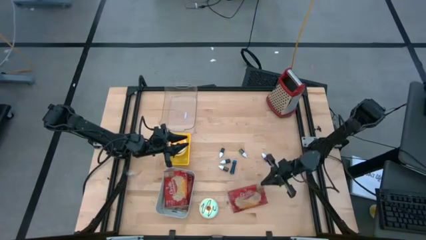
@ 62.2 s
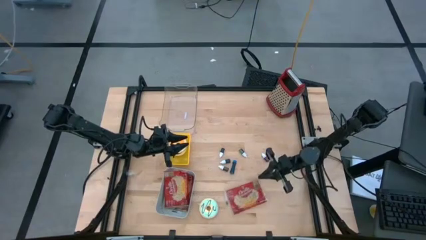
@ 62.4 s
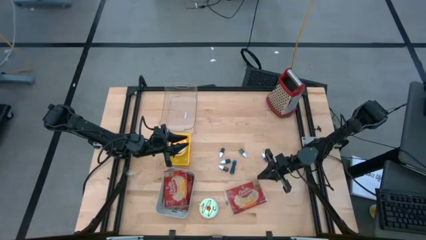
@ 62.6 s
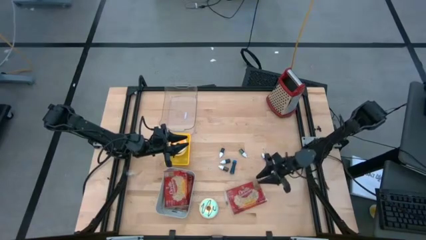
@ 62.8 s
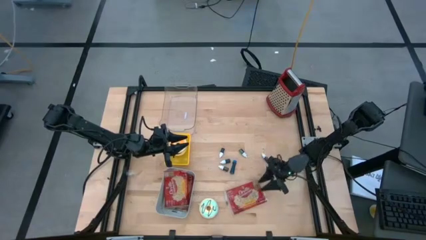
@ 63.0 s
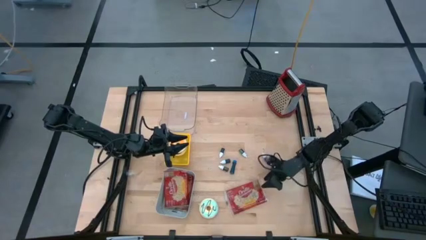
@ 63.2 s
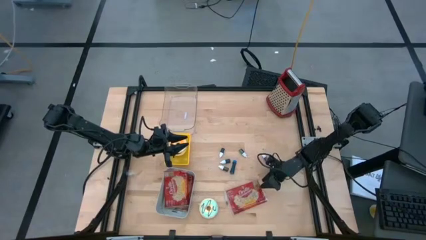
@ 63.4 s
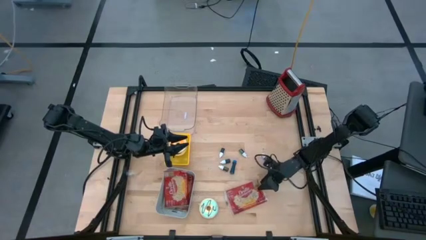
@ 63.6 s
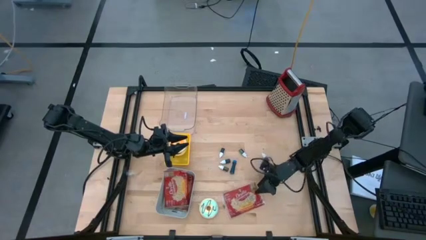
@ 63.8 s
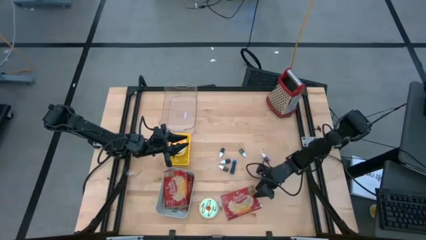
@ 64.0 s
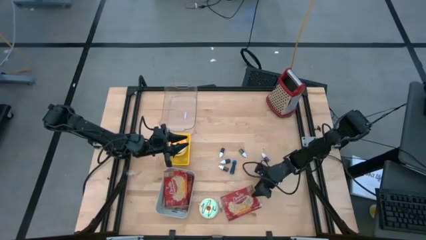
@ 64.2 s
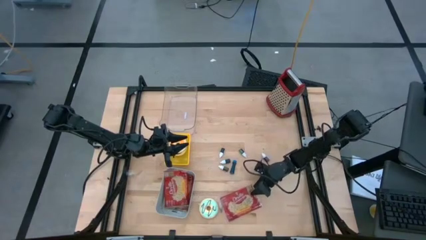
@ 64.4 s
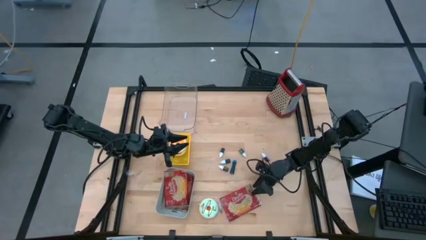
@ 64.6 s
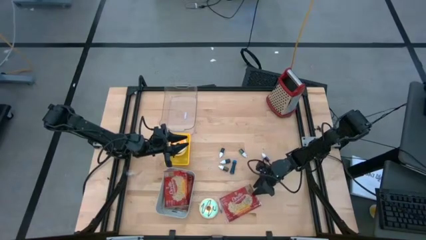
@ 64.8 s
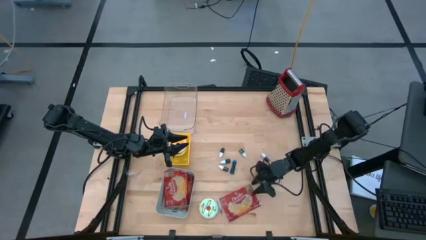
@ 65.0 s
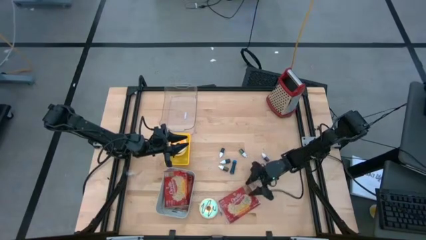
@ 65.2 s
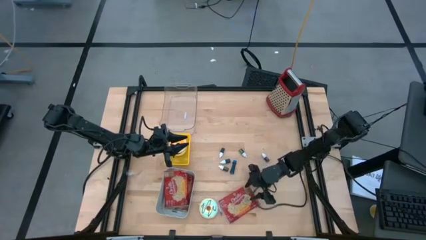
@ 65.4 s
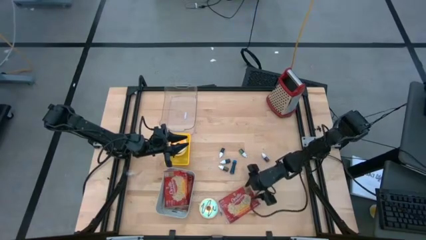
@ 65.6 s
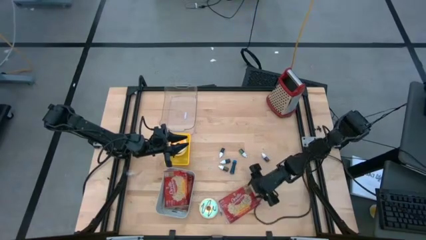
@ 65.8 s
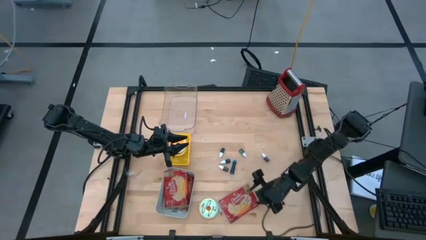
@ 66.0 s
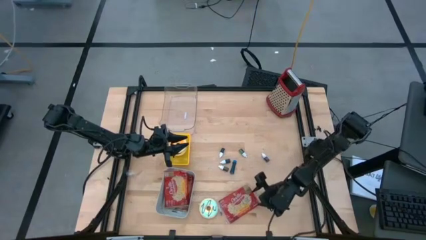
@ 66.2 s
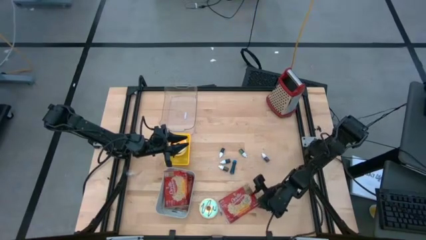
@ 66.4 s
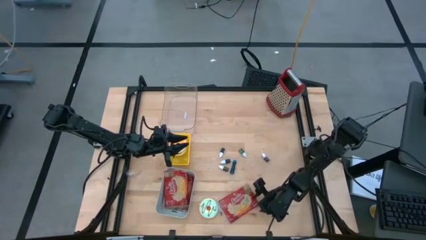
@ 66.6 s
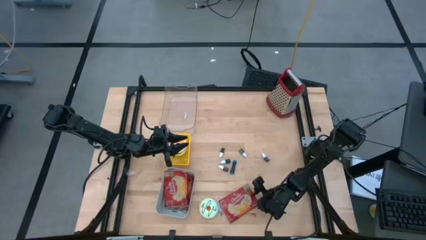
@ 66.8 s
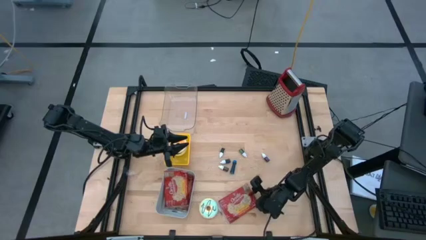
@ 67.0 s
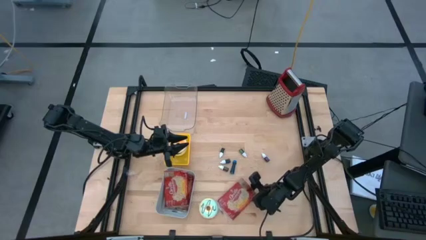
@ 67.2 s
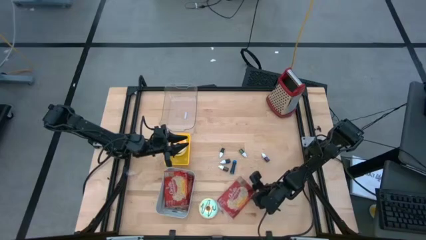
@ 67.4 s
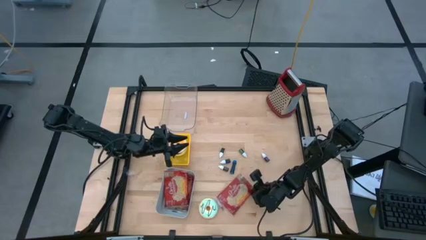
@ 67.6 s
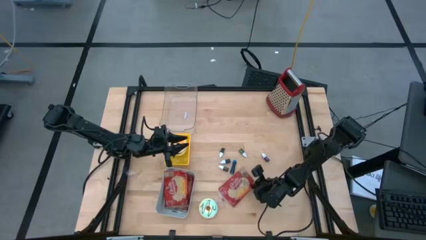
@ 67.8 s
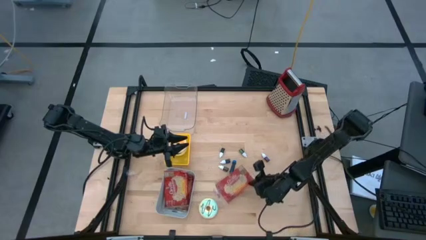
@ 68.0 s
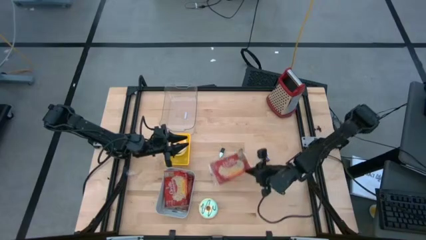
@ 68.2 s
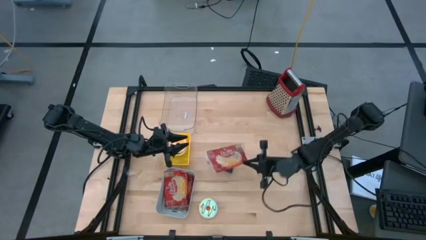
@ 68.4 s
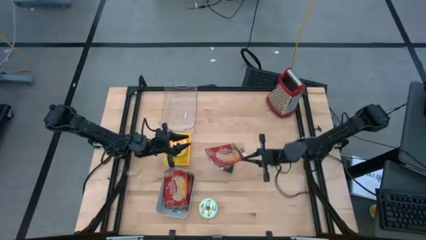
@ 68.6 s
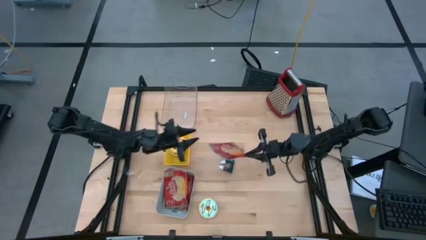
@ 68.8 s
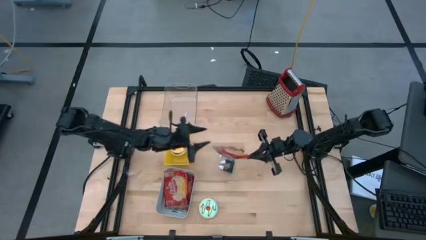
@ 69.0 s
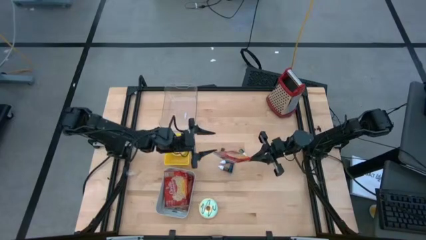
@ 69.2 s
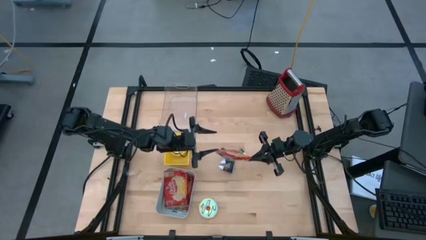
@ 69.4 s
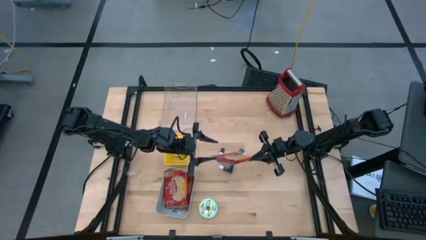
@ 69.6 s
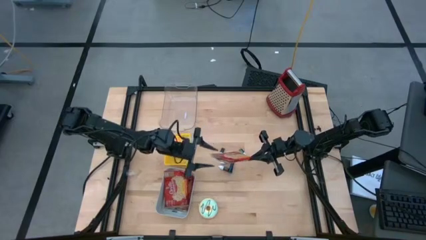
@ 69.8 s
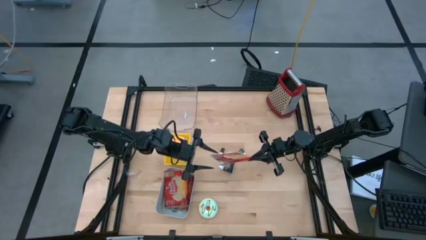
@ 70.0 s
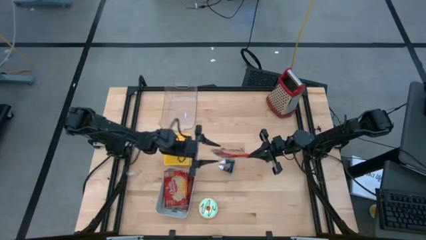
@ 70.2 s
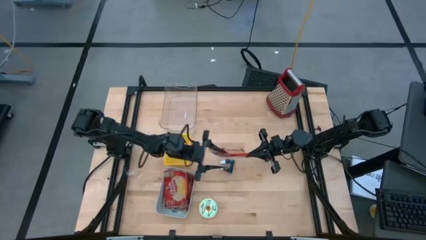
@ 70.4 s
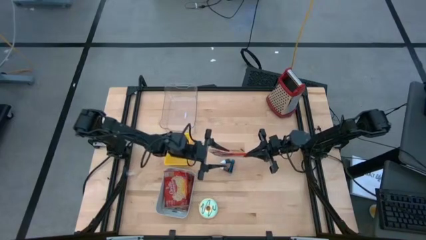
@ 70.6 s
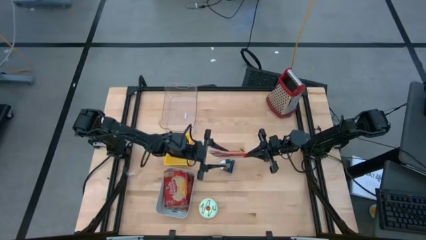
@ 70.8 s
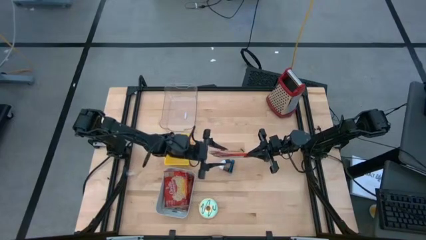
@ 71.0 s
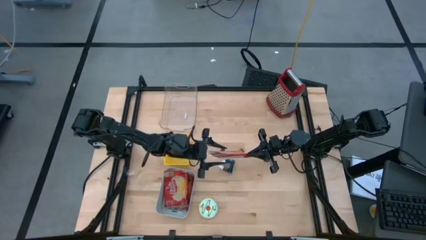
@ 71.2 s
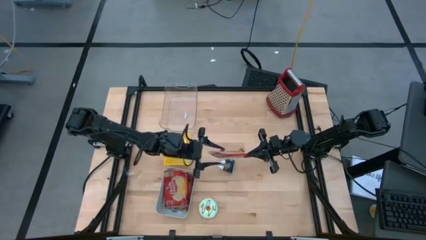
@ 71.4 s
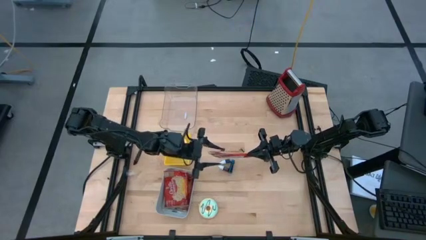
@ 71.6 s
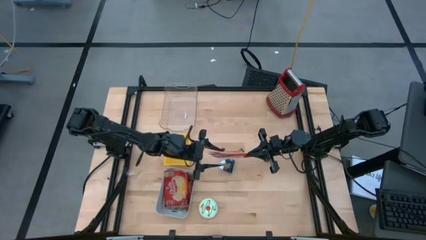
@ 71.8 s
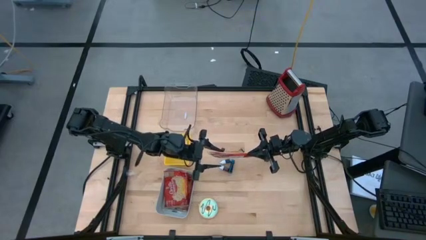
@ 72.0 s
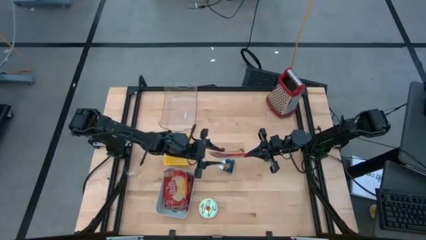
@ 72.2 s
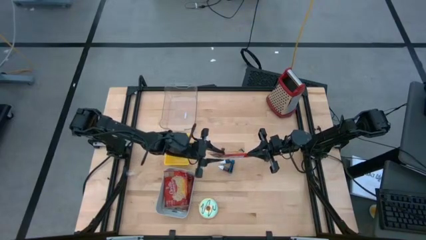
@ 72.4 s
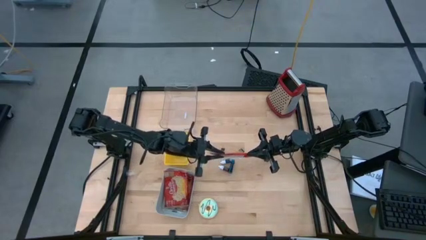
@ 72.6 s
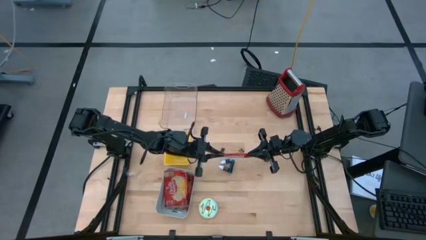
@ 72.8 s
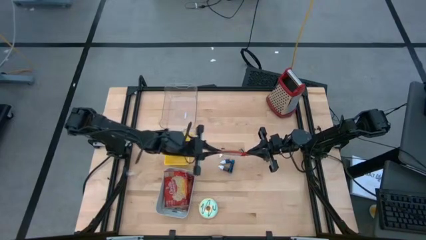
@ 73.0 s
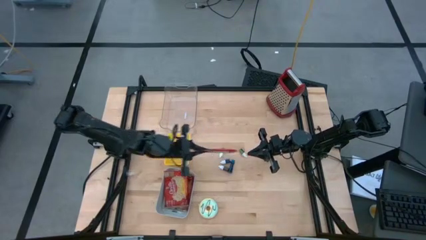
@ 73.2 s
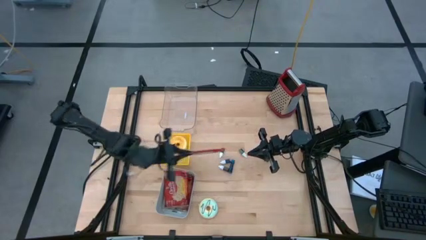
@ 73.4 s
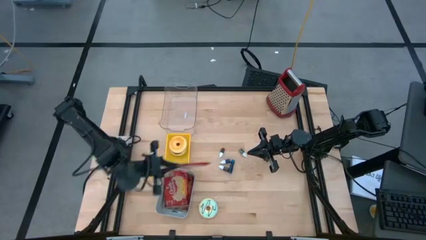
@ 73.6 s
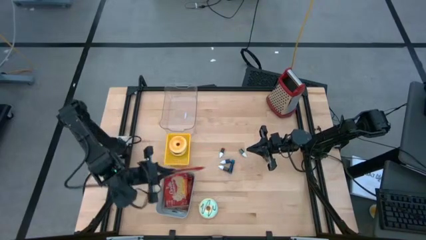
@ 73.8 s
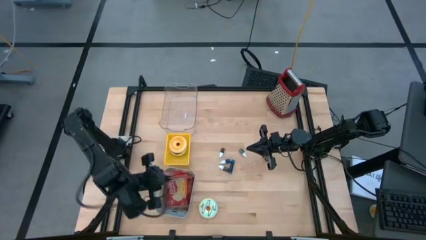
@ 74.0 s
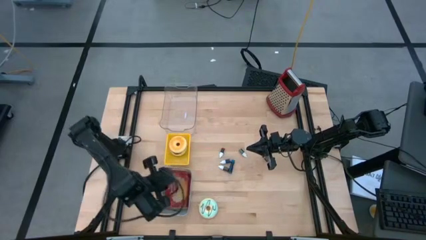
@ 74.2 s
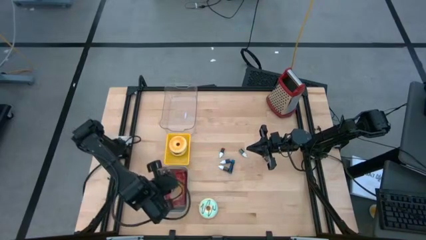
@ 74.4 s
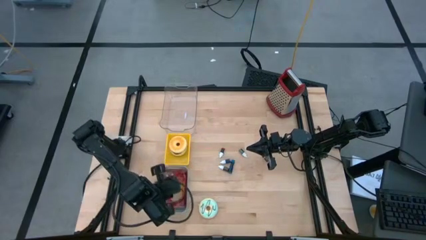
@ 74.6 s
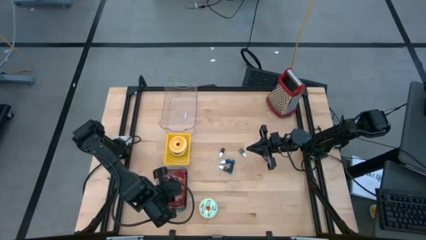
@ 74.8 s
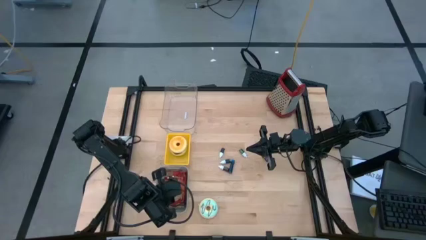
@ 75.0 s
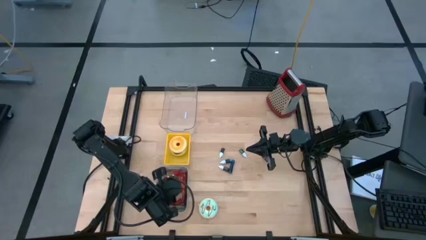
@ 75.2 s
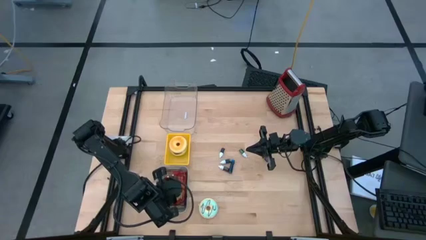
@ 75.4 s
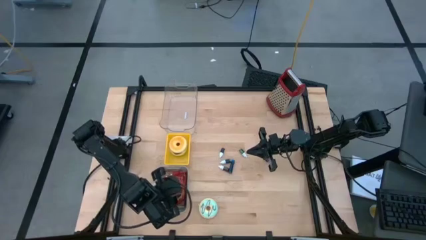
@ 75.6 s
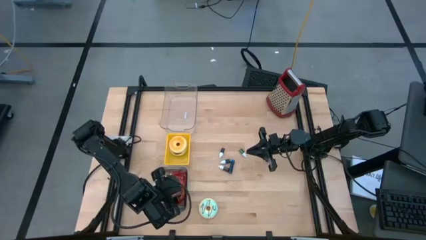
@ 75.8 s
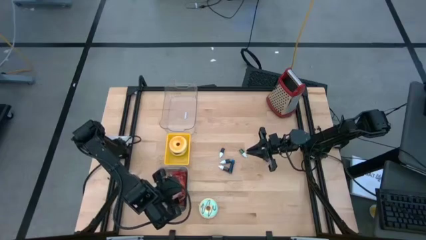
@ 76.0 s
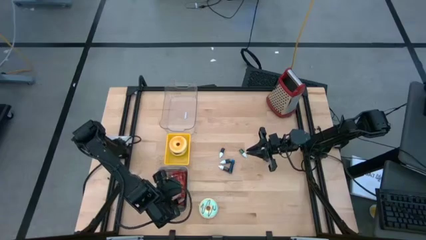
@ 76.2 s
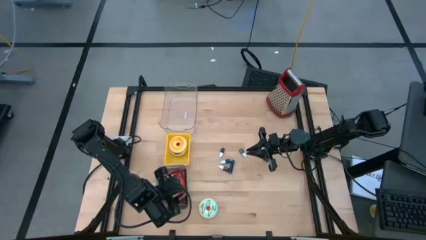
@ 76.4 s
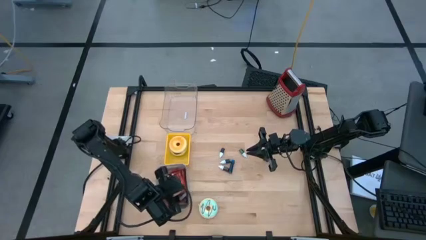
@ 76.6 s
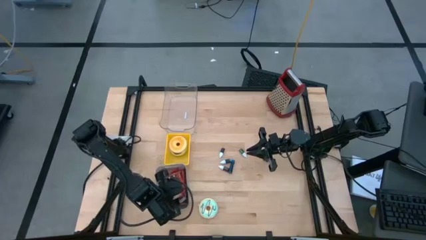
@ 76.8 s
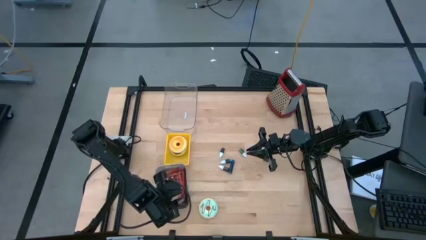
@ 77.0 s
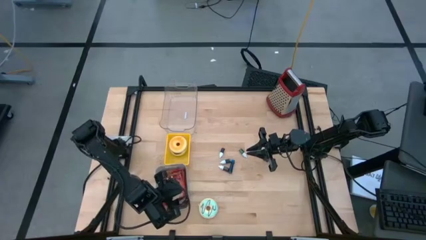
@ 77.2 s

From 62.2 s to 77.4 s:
Task: Pick & Place Food Item
Put the red popcorn bag into the white bin
